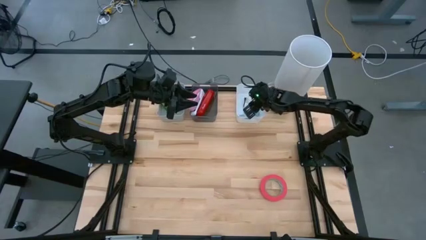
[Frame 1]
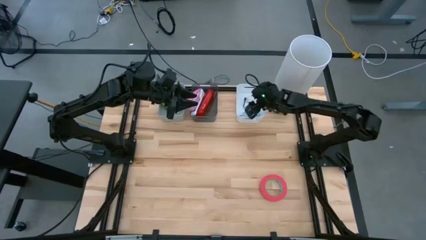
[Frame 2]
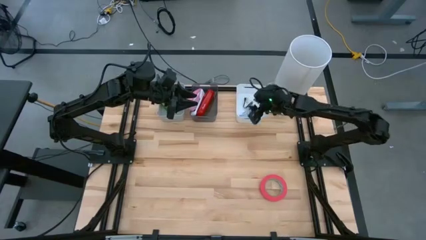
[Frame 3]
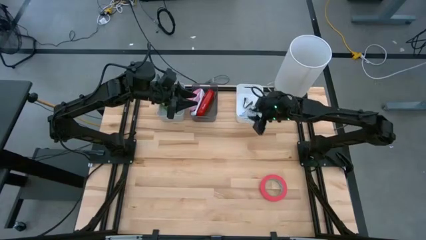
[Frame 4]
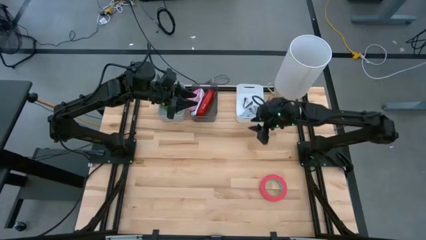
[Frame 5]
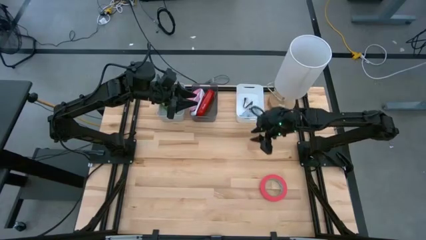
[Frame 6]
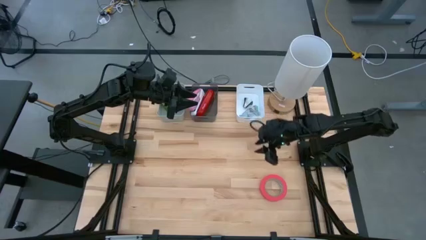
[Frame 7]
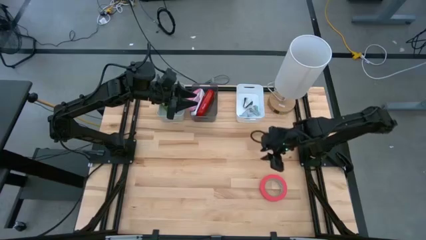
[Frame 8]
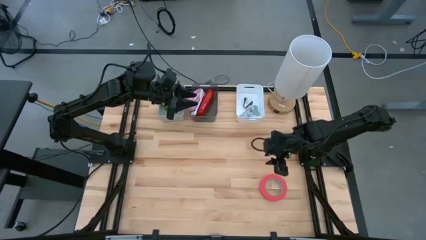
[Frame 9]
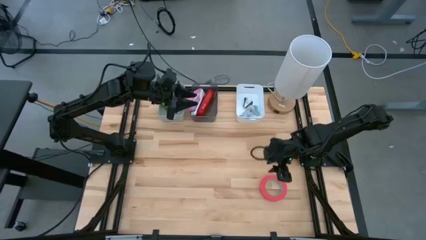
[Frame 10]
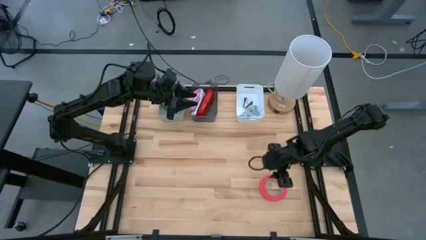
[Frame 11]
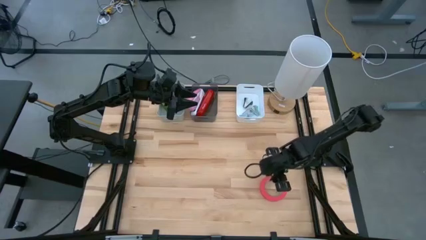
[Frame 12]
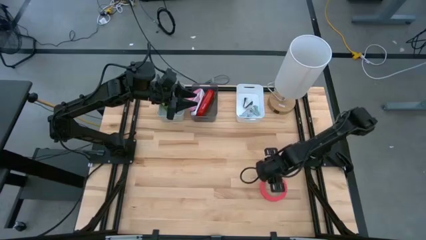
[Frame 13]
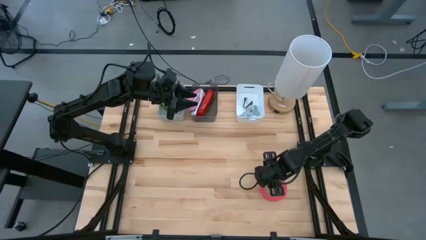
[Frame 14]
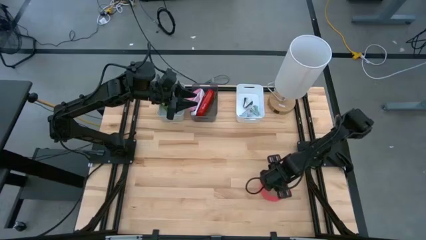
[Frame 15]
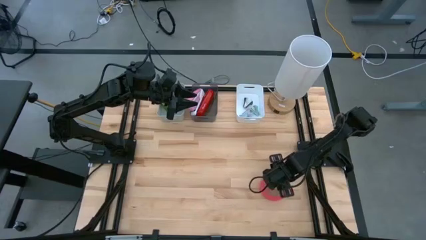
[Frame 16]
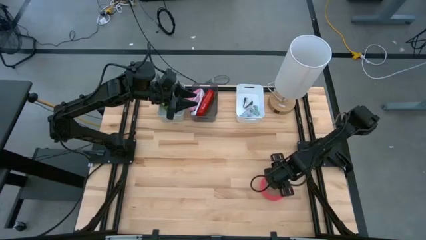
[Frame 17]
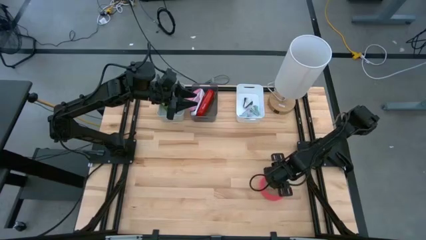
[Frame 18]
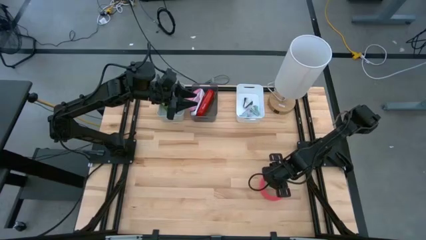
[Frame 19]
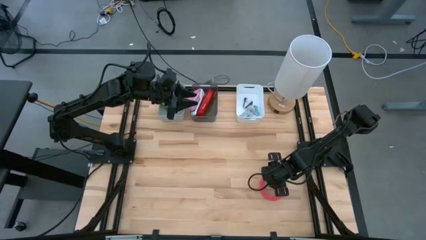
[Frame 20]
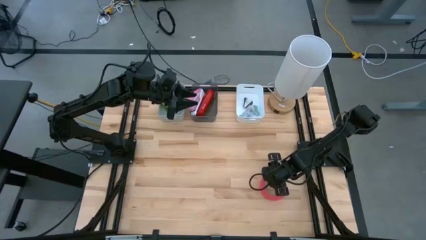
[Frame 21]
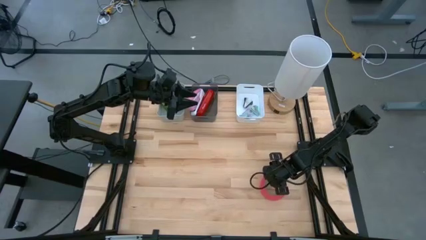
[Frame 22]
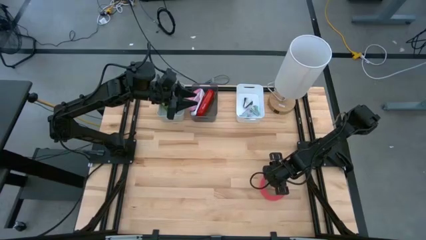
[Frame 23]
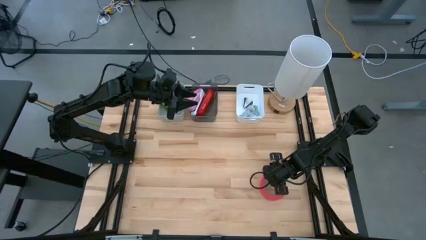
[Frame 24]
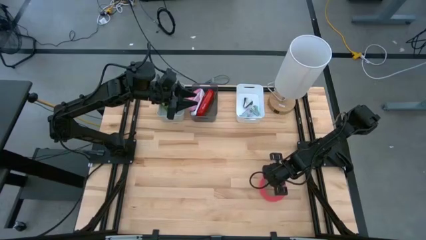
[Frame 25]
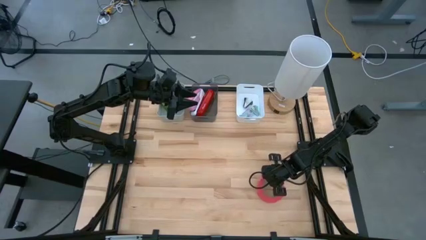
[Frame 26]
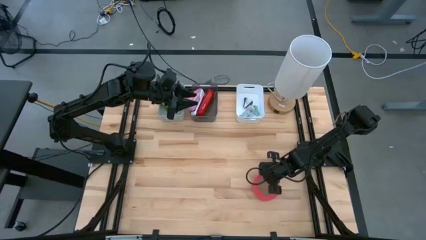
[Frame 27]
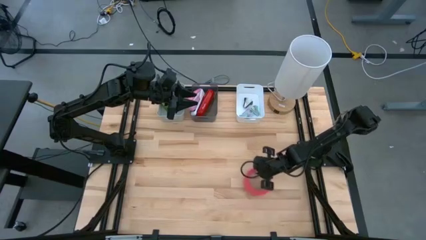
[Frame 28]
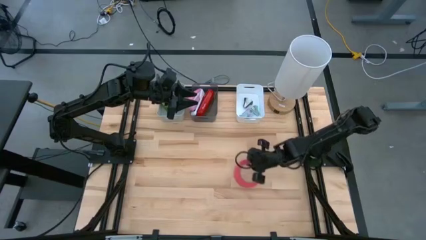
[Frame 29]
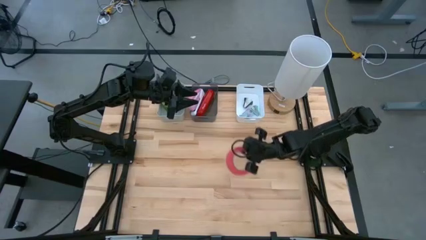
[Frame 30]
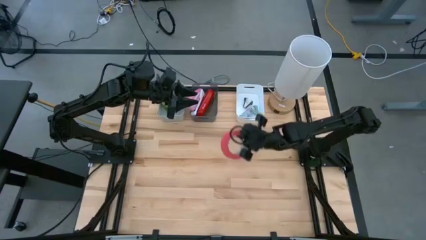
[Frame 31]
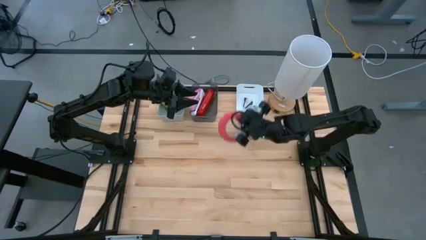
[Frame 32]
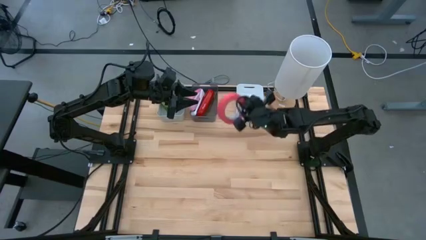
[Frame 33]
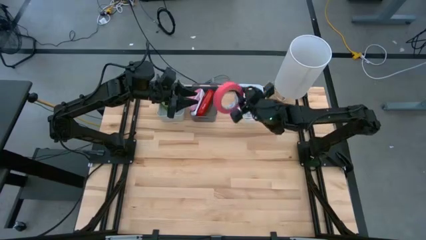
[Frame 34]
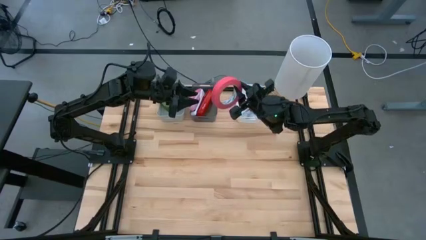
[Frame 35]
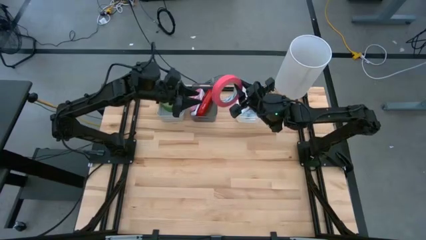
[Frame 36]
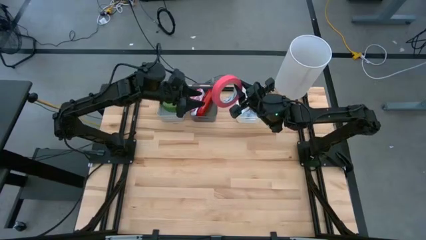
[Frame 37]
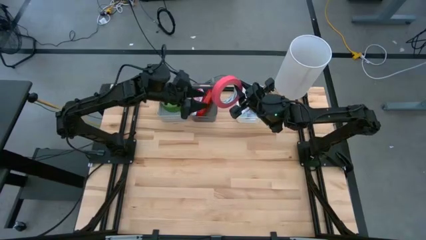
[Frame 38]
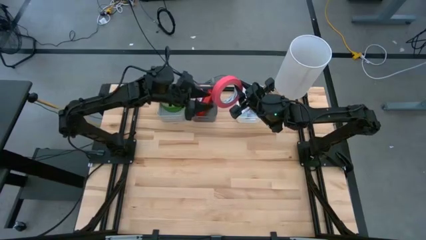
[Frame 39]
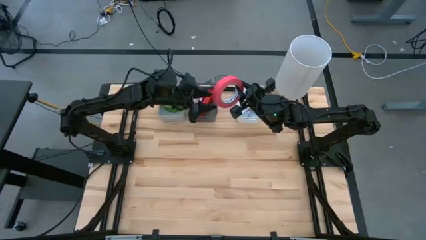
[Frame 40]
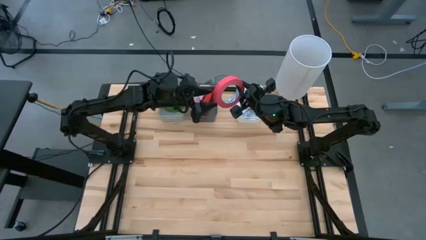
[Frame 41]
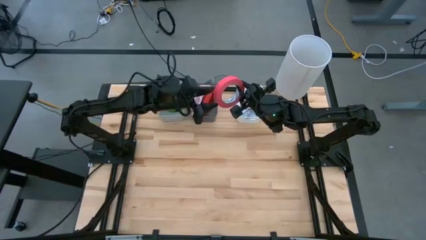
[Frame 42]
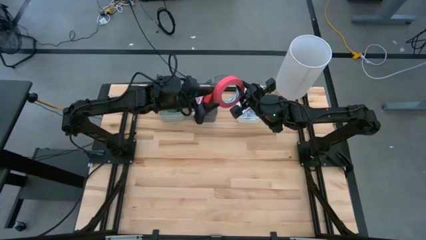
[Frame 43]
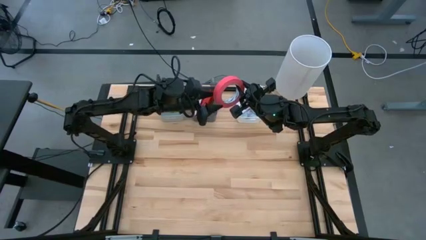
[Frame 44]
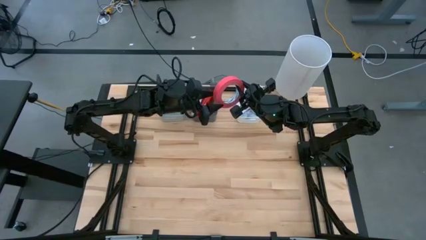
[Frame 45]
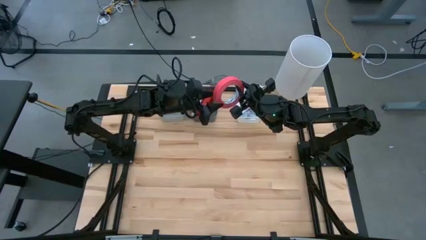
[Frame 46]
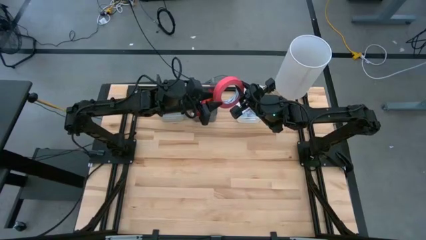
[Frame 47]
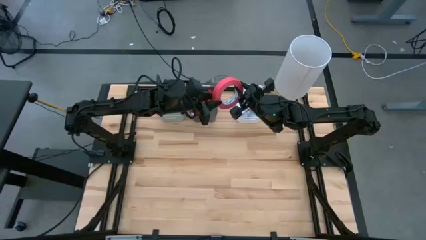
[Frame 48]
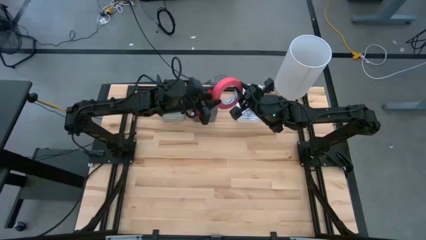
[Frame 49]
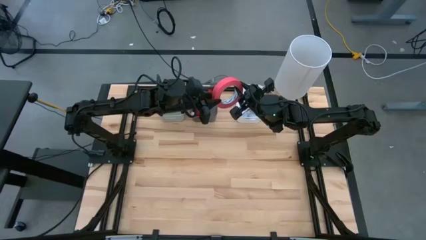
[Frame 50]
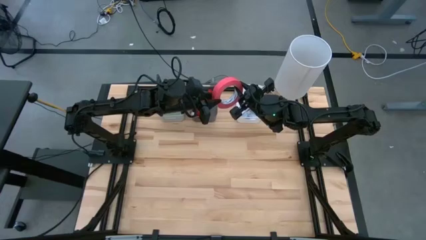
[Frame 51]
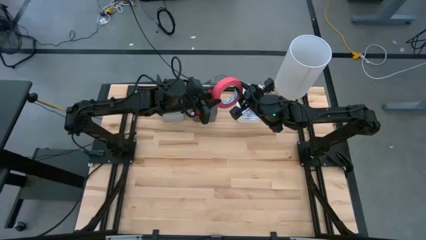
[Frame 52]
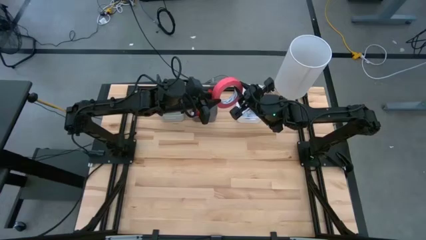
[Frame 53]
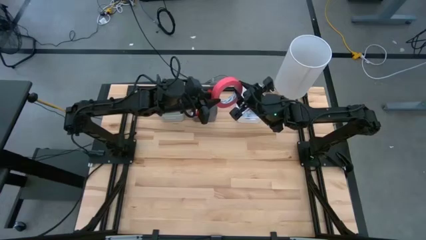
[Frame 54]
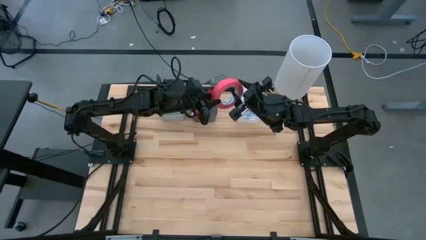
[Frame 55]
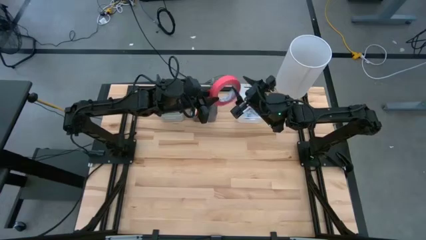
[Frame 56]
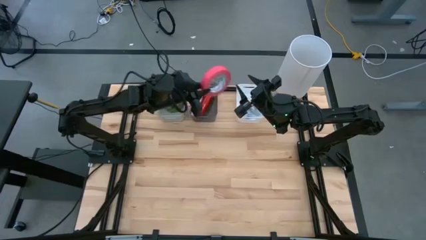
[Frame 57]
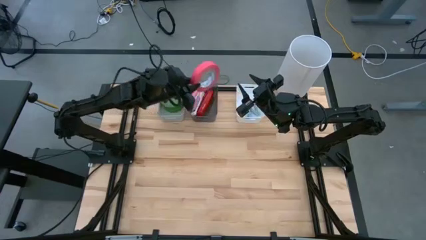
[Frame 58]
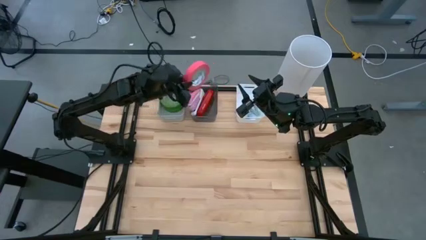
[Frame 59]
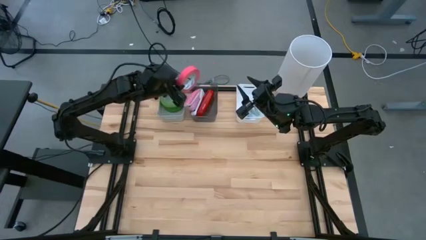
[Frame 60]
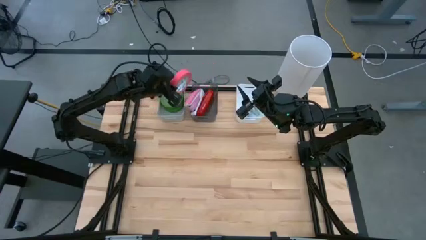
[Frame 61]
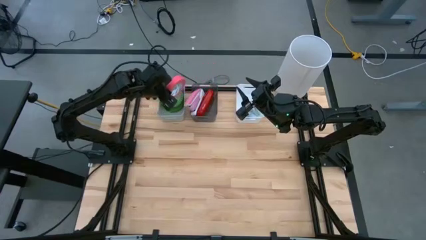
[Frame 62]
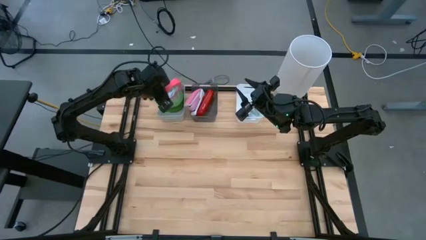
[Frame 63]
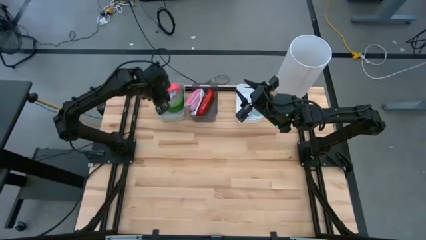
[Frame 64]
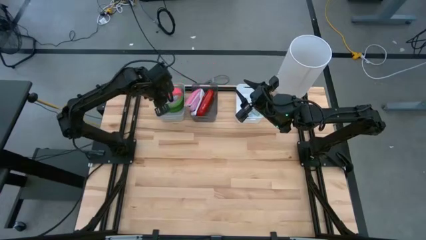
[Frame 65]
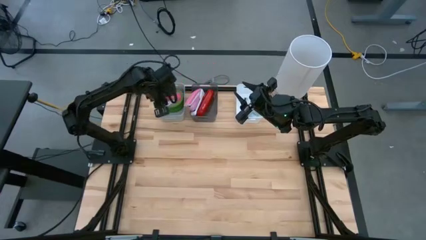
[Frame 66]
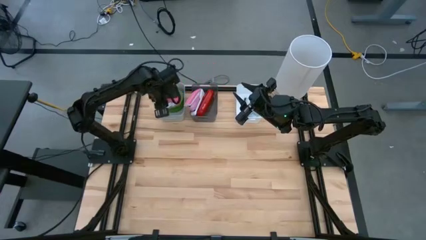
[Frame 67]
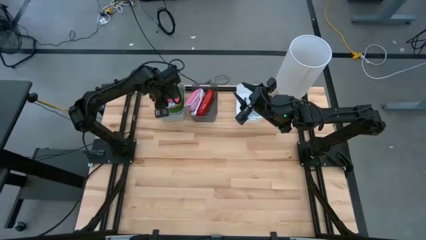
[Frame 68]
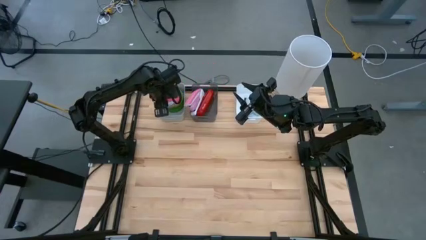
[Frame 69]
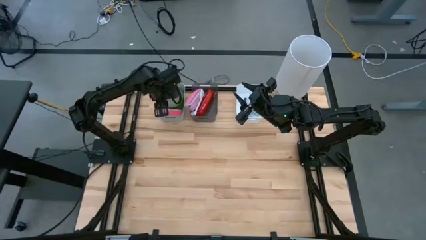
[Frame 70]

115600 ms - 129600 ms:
Task: Pick and place Stapler, Stapler remover, tape
Put the pink tape into the gray bin
